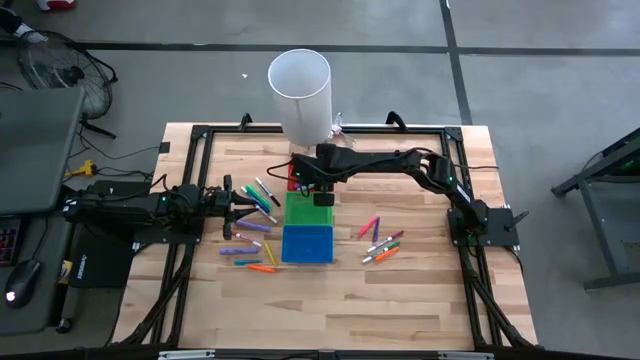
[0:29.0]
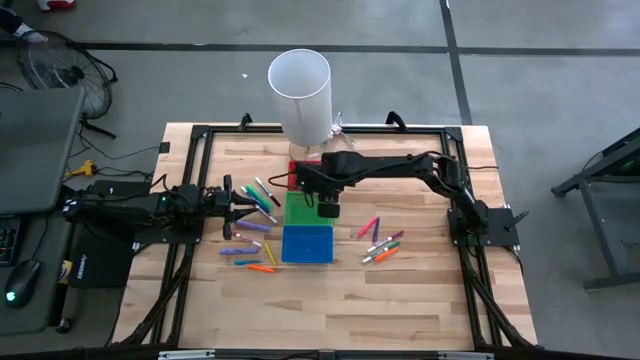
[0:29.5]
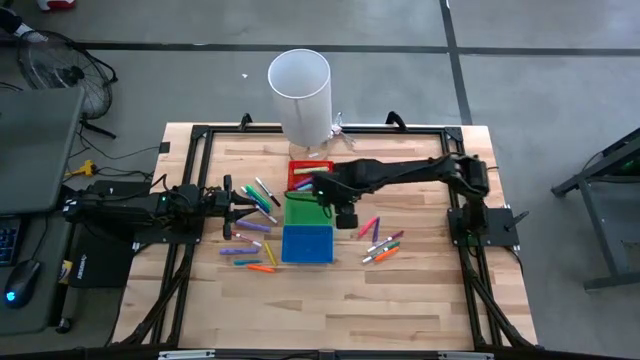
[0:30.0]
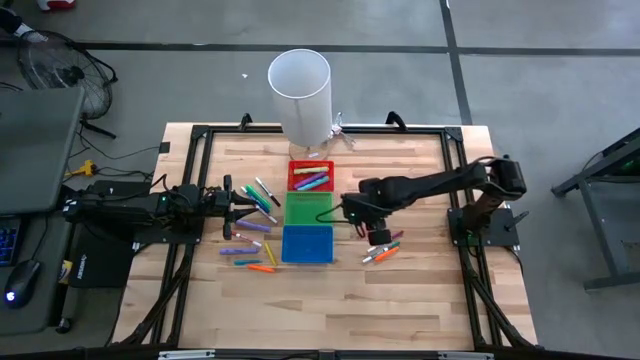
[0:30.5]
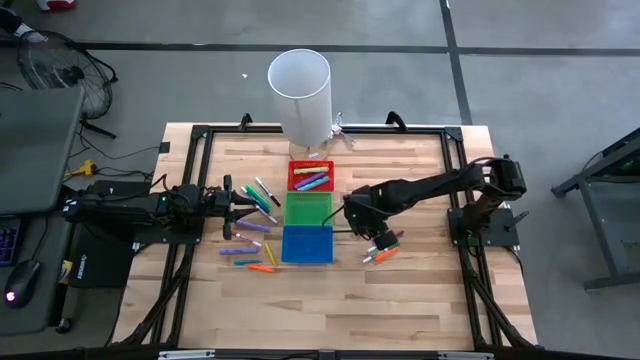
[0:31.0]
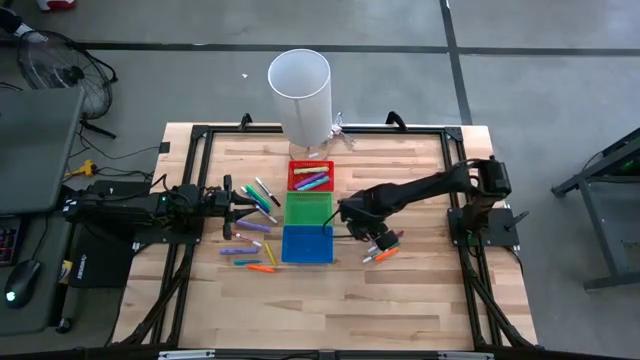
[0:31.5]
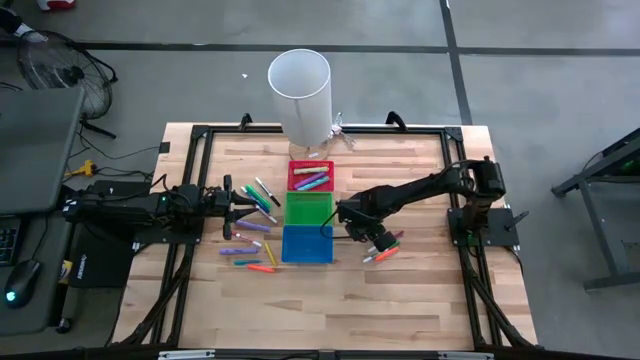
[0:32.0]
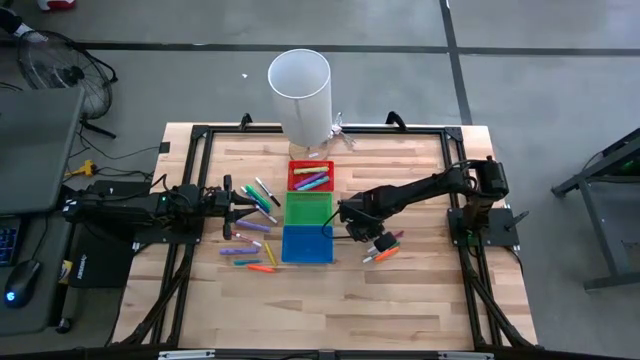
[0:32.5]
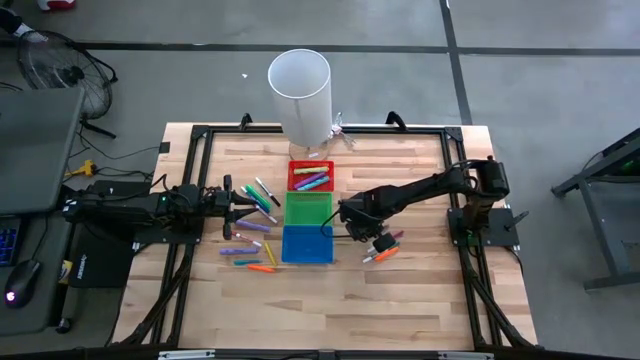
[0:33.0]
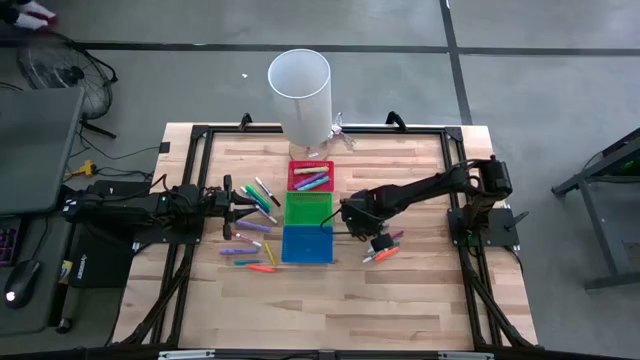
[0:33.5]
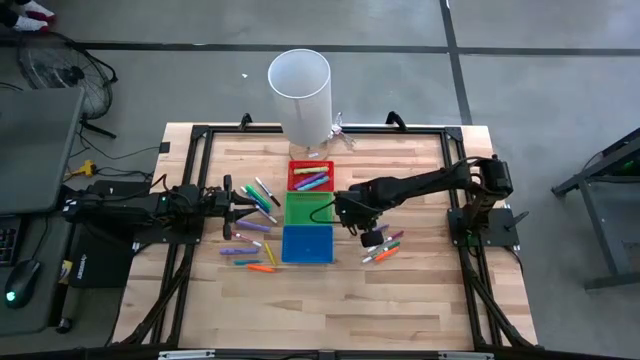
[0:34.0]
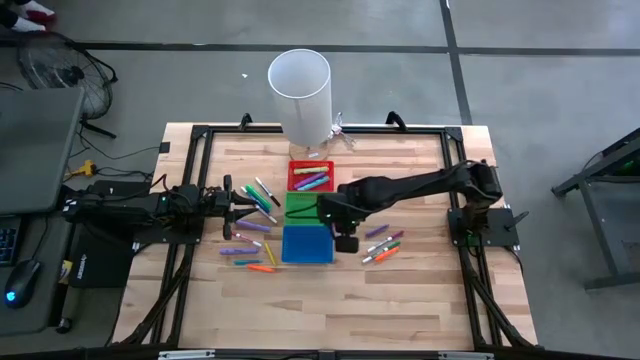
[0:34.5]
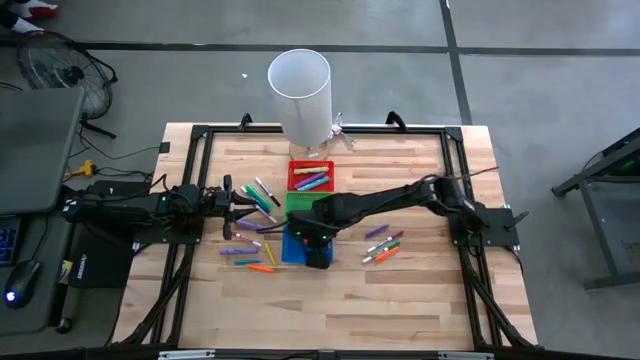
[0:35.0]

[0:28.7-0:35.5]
Task: Pick & Place Markers
Put the pink pen into the blue bin

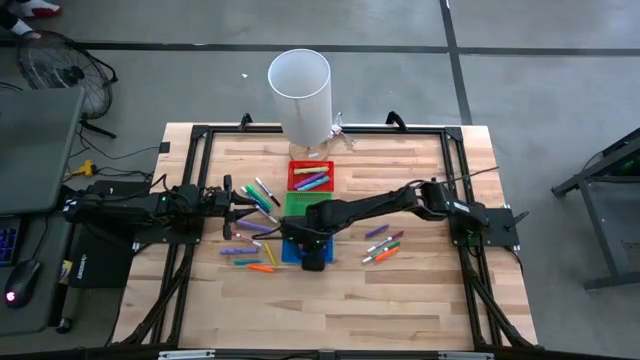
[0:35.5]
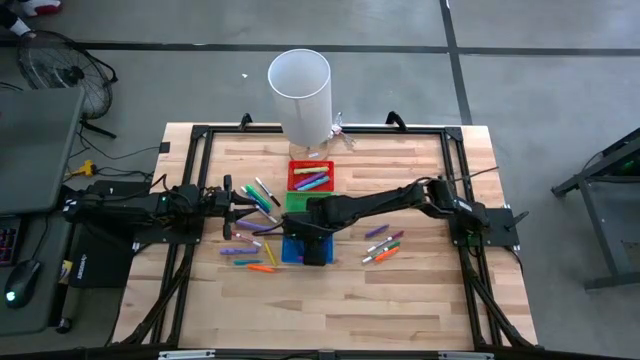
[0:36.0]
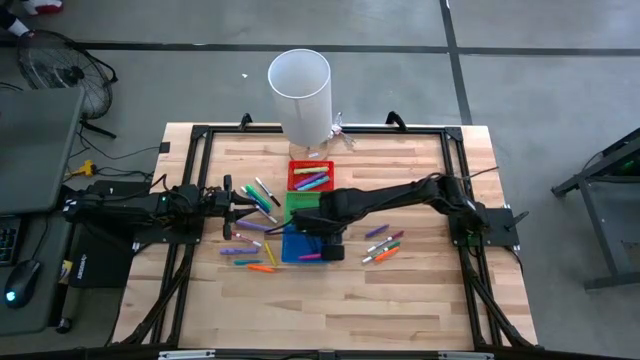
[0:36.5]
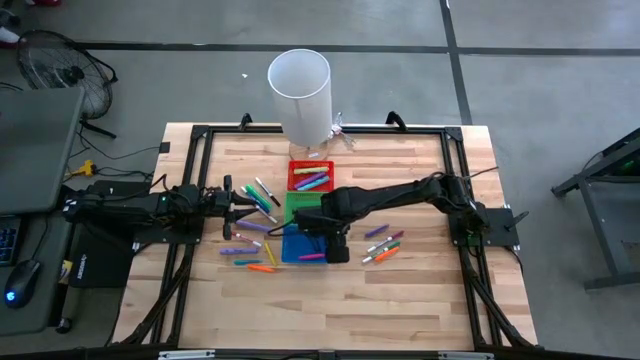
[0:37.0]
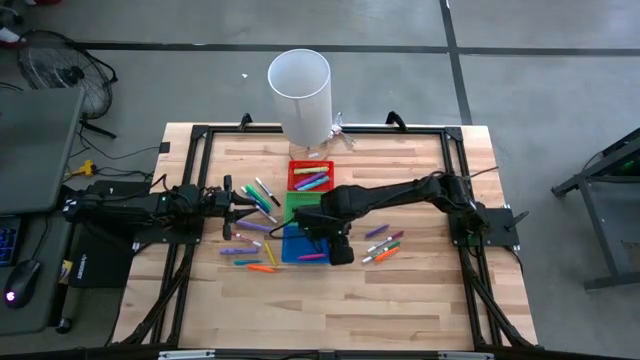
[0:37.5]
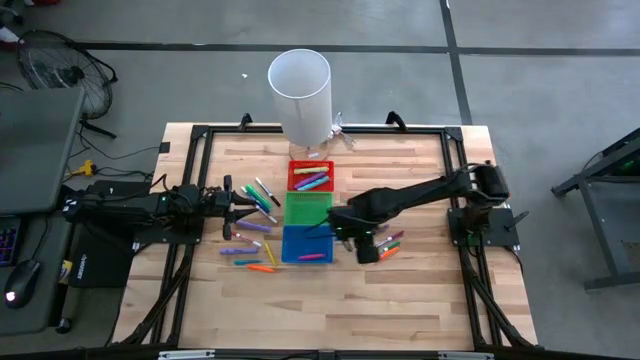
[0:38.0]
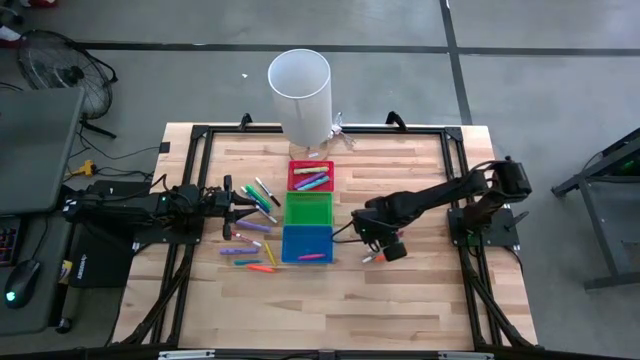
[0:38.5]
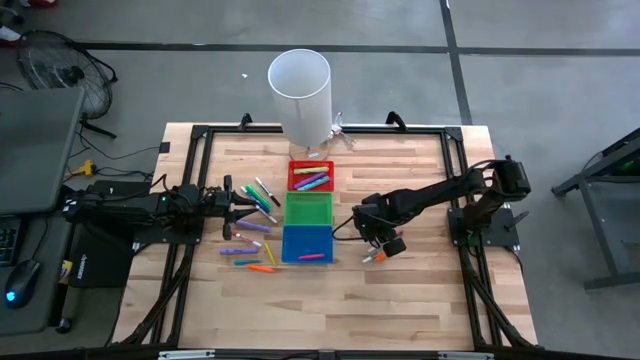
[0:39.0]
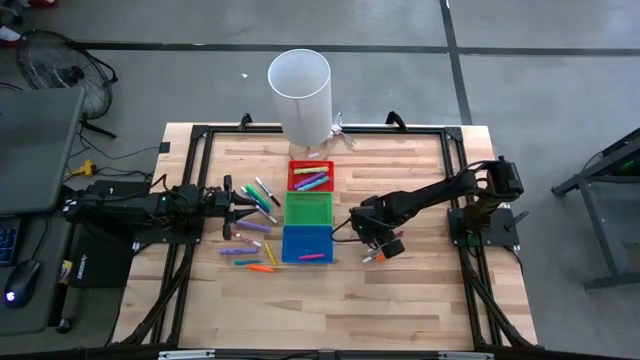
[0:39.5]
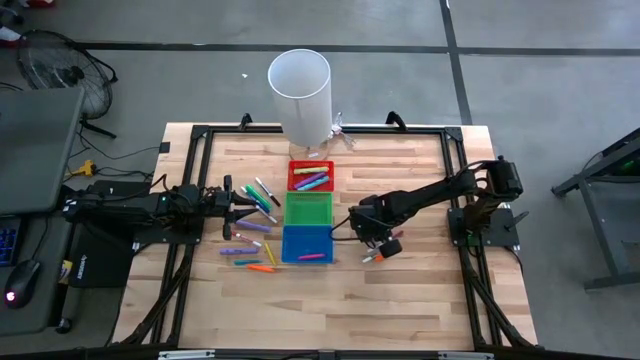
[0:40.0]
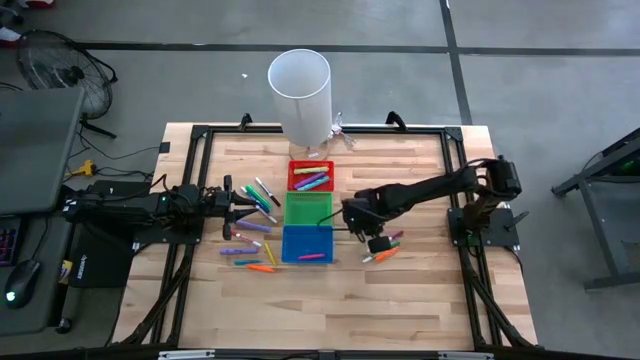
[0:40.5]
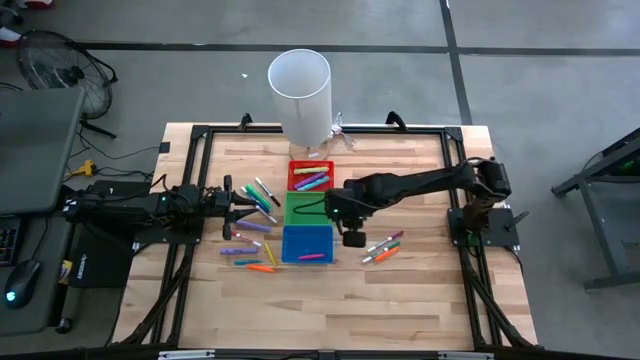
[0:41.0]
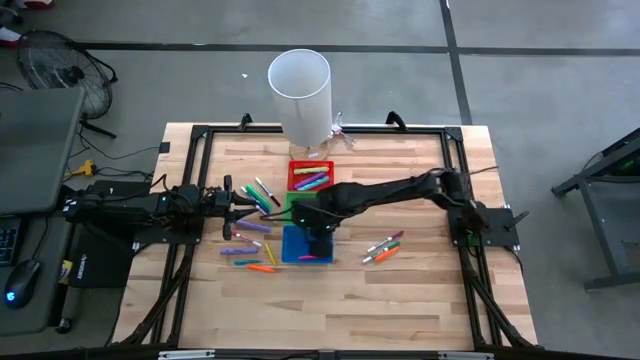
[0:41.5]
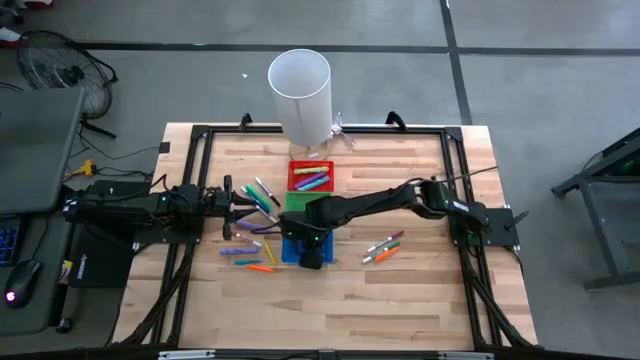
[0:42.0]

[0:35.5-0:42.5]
Put the violet pen into the blue bin

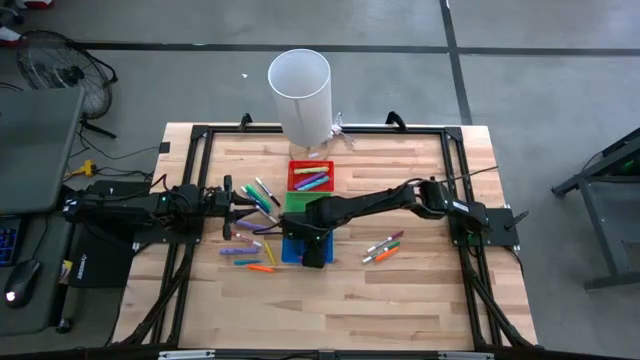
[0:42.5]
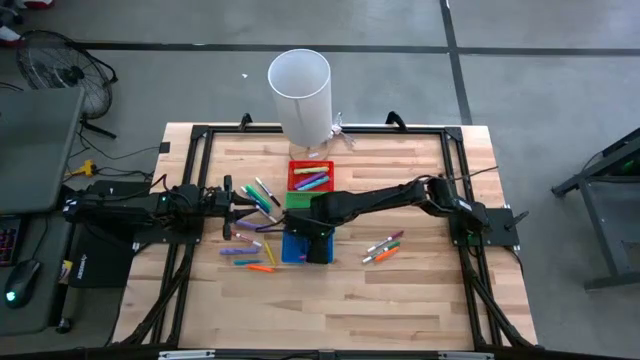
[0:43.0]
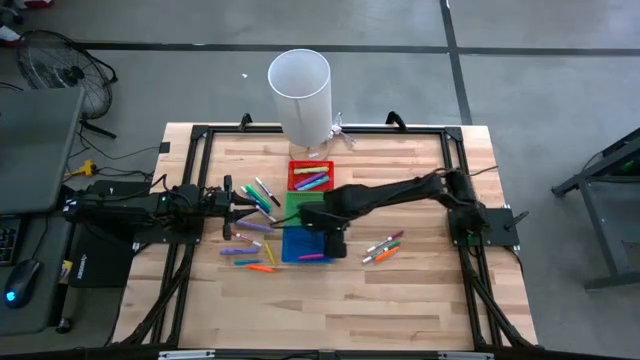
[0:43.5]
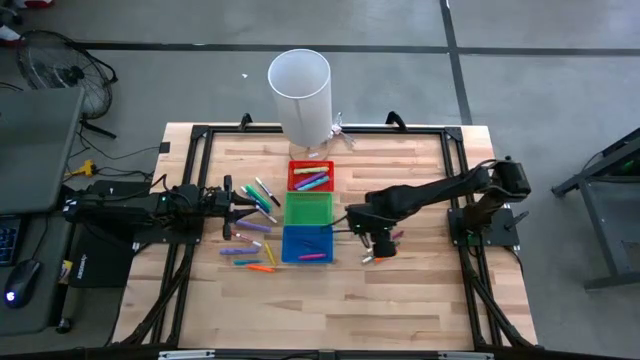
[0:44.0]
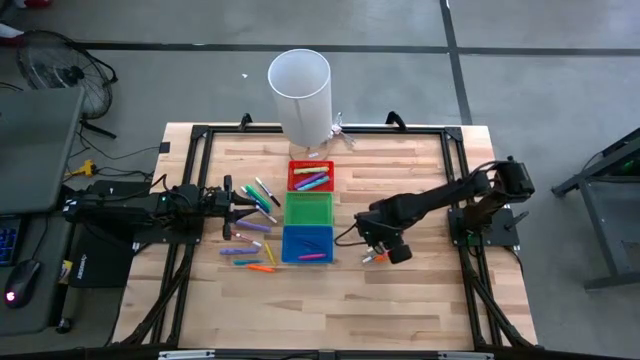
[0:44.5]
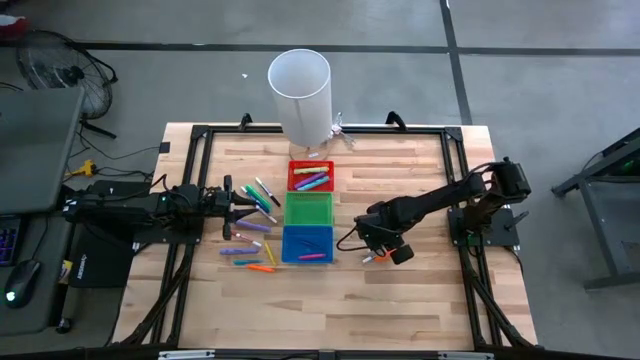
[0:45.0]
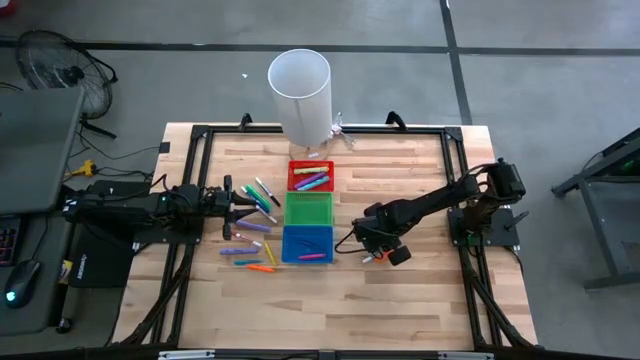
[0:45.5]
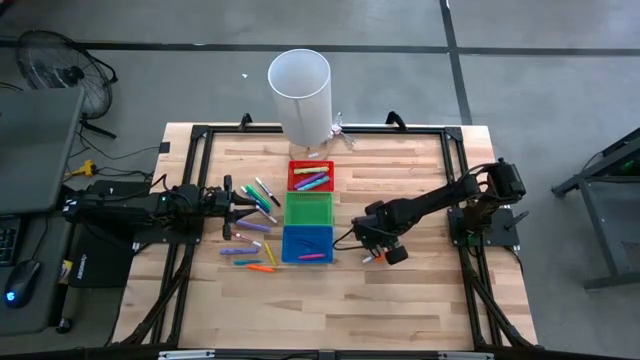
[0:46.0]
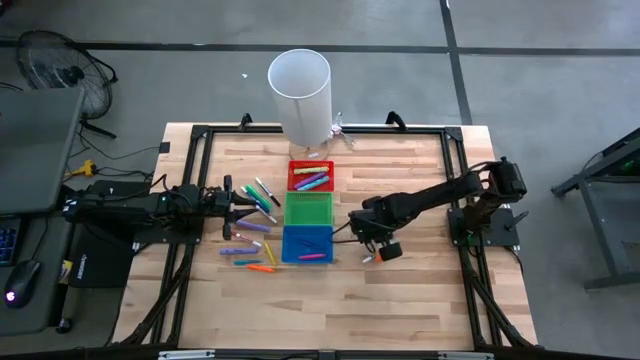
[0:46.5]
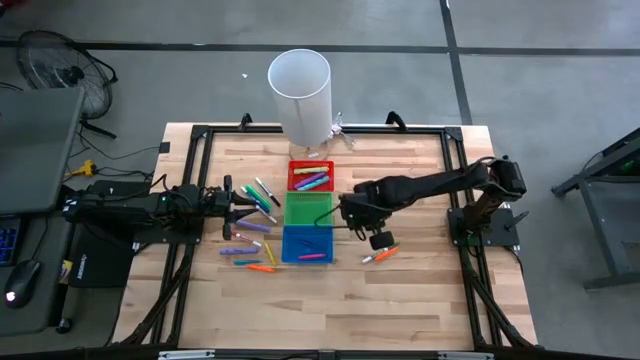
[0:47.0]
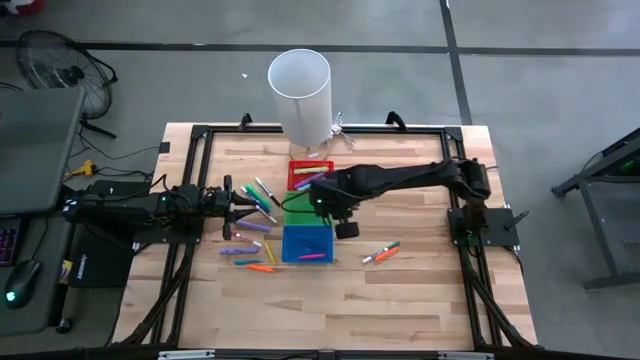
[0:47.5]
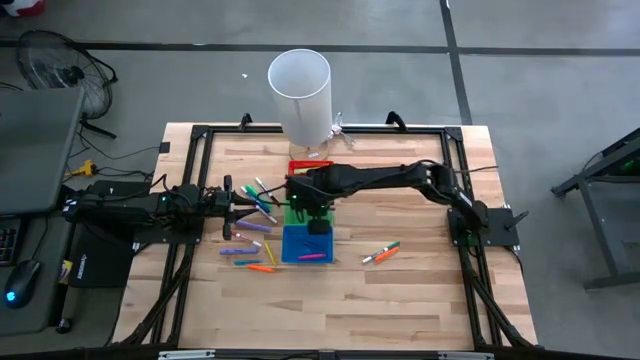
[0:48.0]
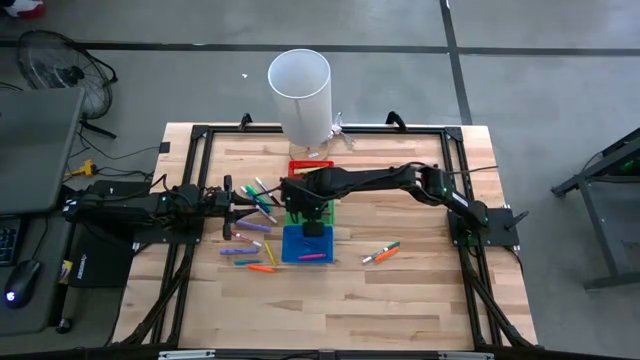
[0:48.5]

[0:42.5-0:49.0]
Put the white and violet marker pen into the green bin

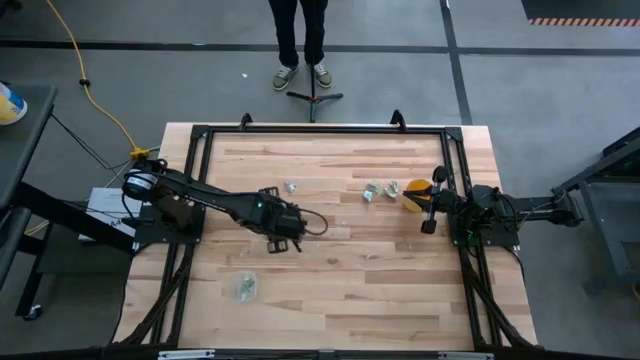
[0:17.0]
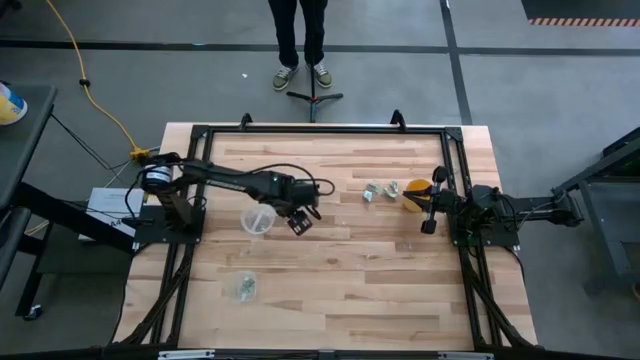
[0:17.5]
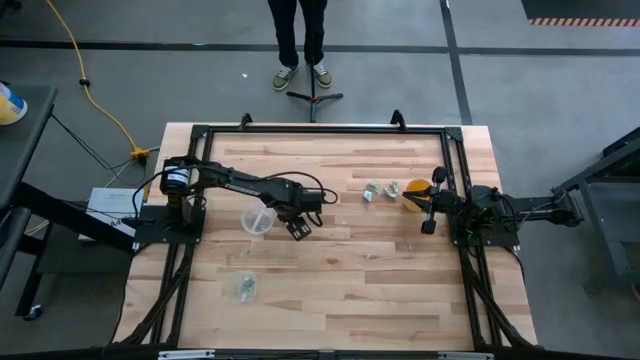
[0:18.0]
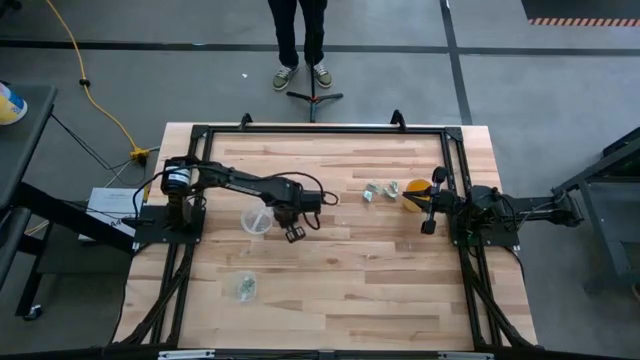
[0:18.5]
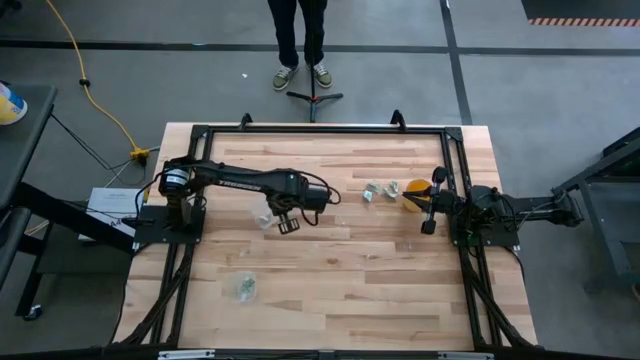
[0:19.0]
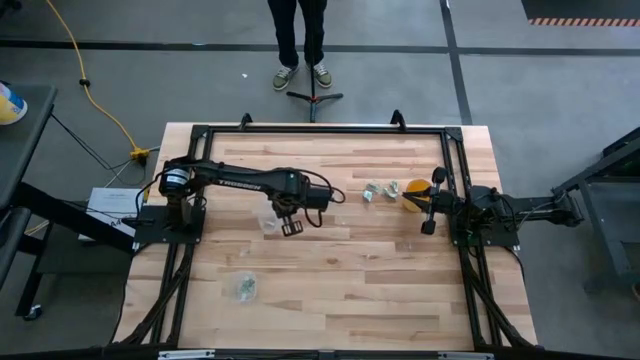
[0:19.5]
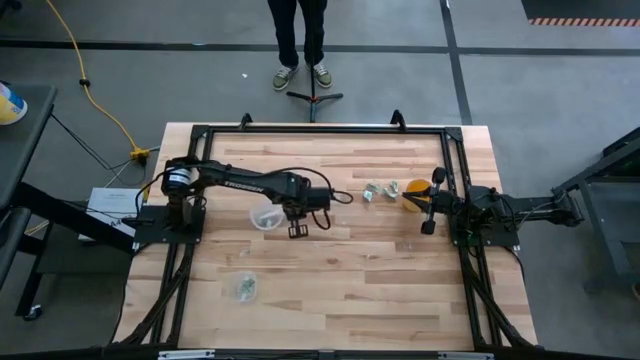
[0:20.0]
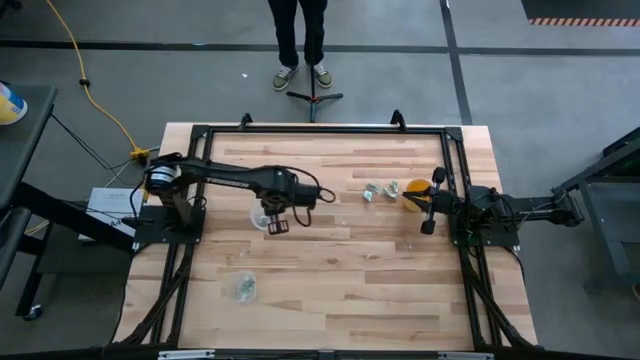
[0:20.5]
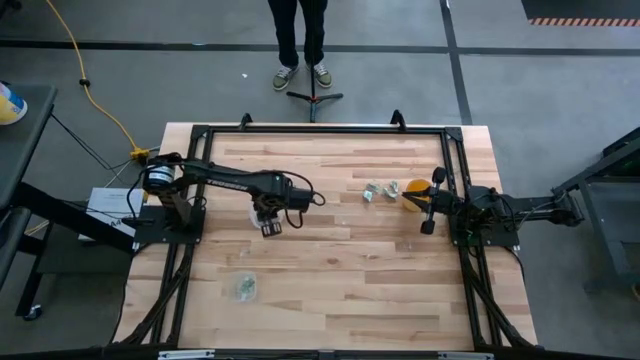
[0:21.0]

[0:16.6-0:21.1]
Task: Pick and place Stevia / Truvia into bins
Put the stevia packet in the top transparent container
